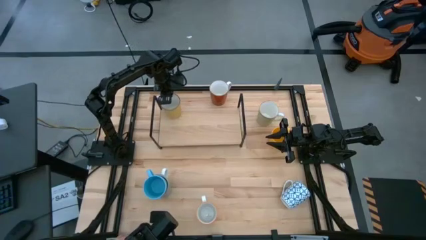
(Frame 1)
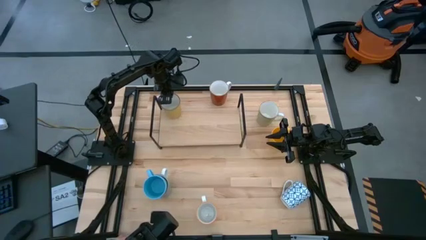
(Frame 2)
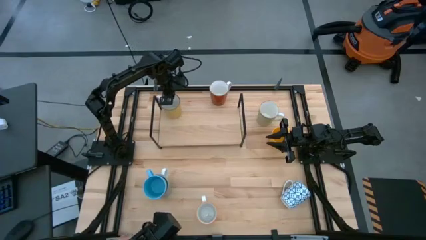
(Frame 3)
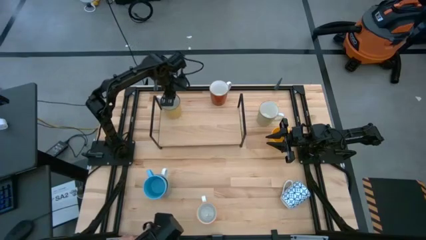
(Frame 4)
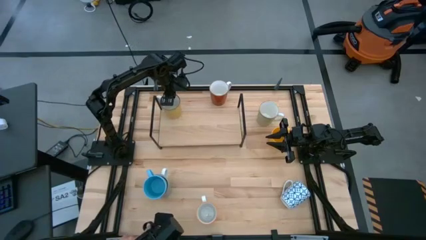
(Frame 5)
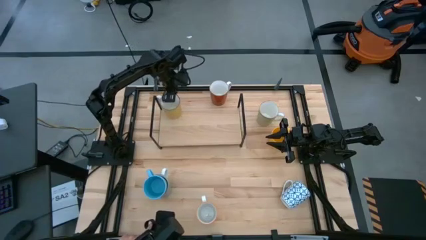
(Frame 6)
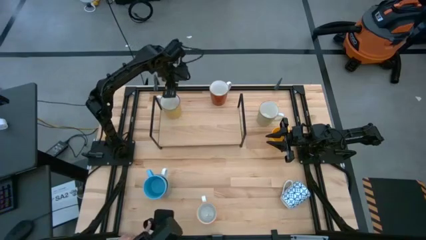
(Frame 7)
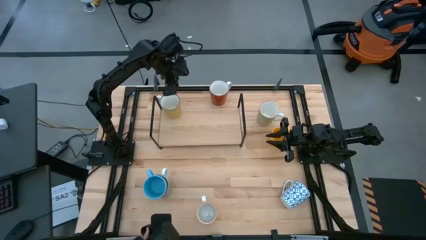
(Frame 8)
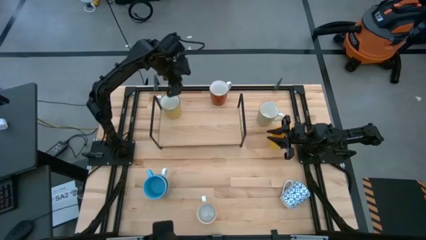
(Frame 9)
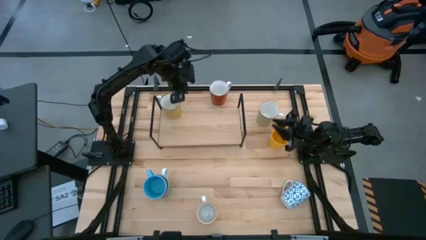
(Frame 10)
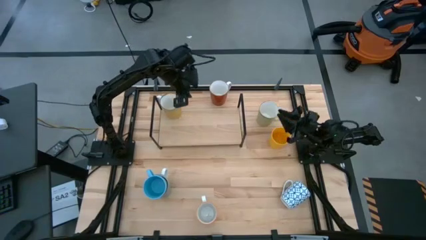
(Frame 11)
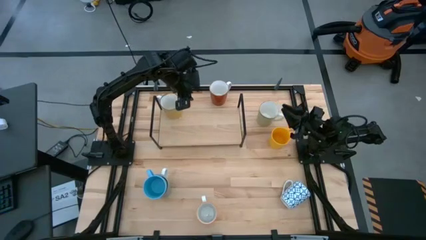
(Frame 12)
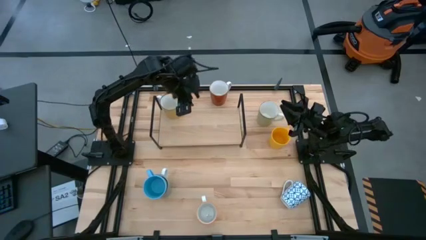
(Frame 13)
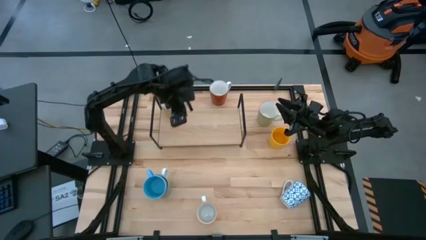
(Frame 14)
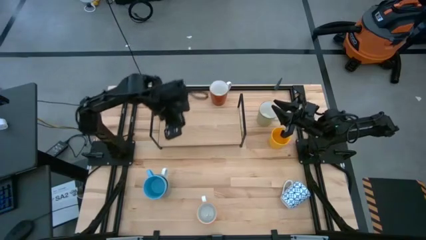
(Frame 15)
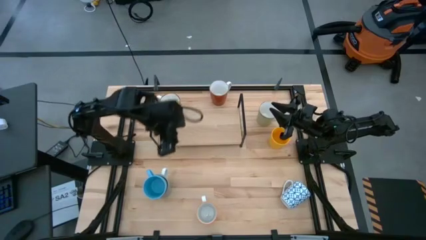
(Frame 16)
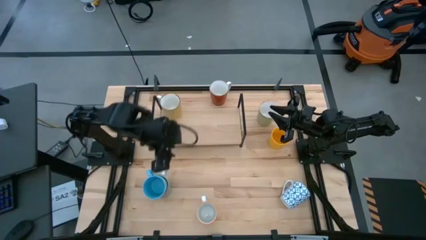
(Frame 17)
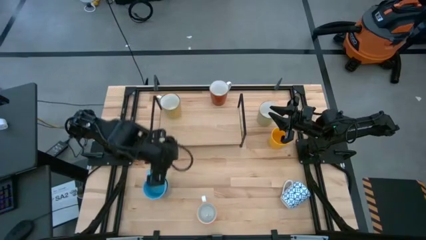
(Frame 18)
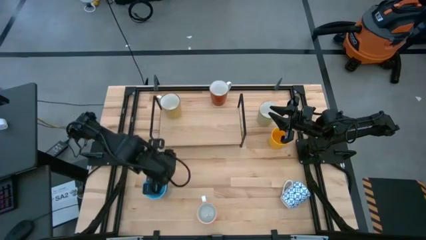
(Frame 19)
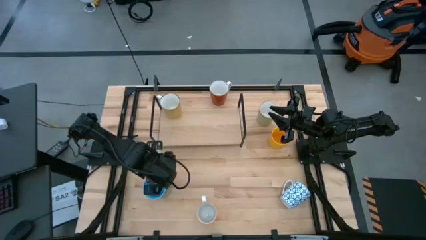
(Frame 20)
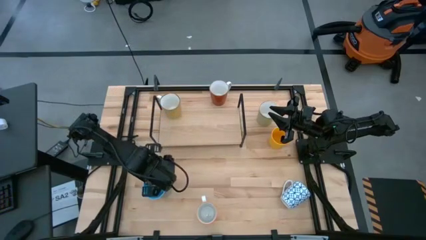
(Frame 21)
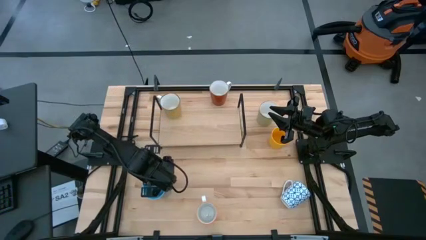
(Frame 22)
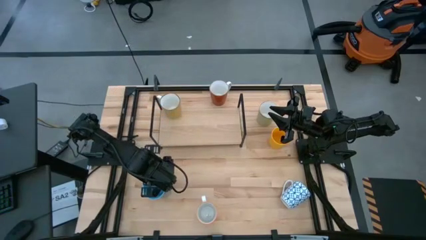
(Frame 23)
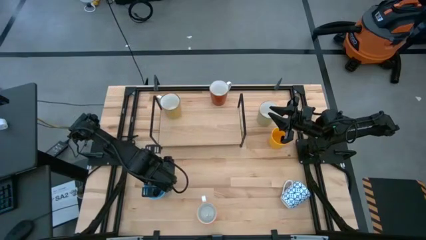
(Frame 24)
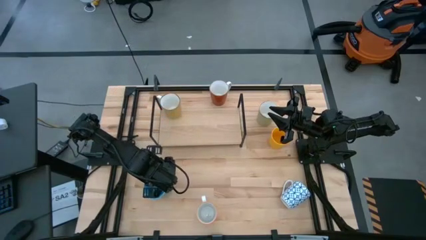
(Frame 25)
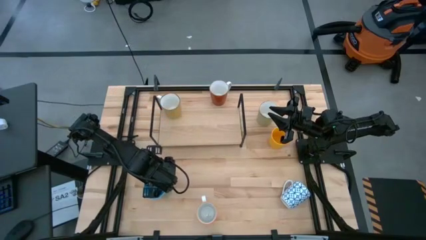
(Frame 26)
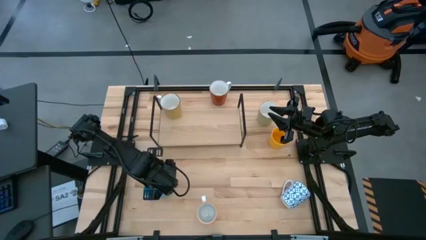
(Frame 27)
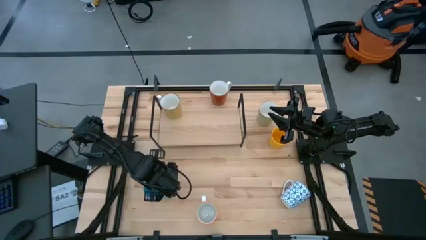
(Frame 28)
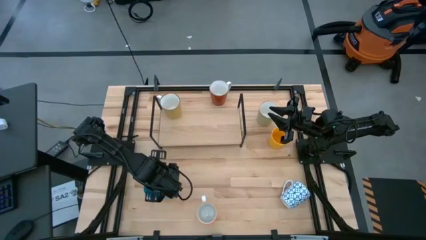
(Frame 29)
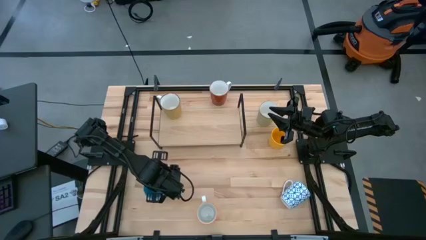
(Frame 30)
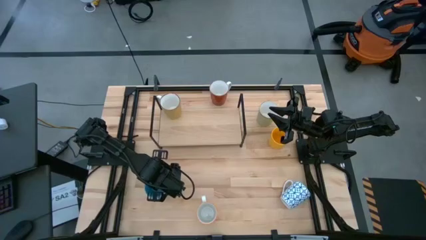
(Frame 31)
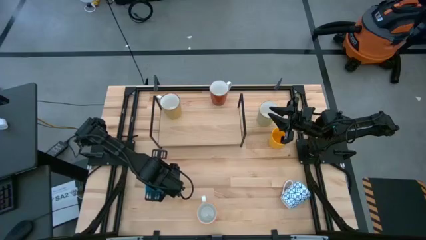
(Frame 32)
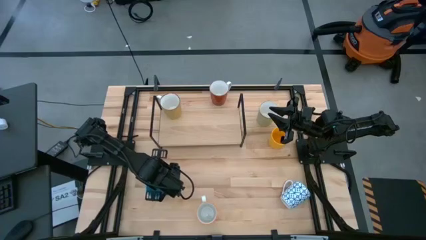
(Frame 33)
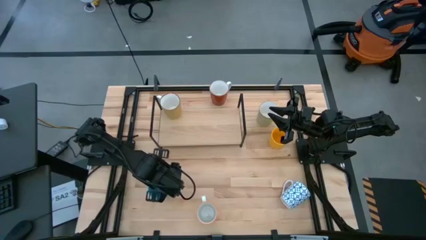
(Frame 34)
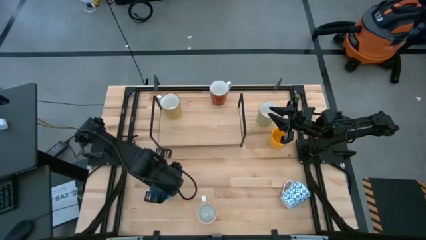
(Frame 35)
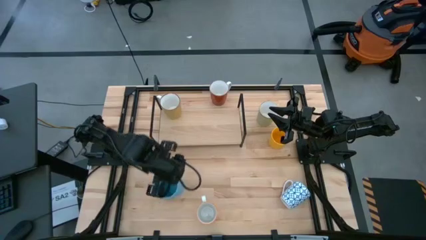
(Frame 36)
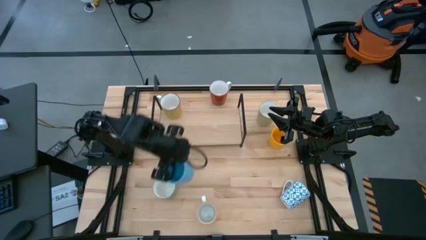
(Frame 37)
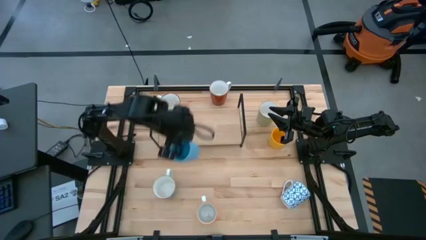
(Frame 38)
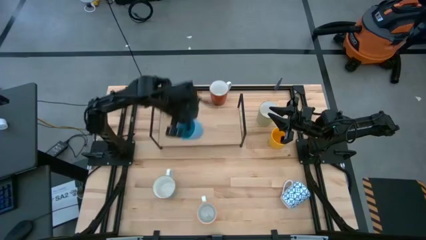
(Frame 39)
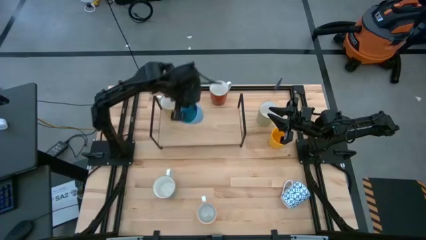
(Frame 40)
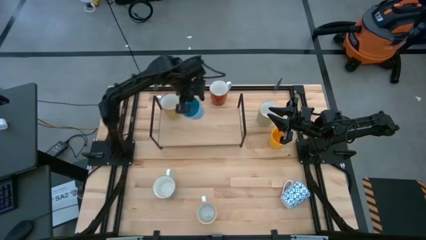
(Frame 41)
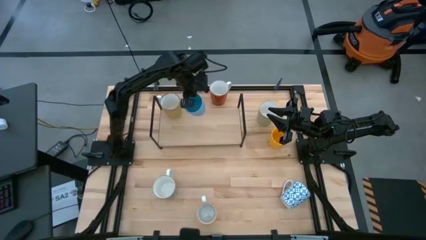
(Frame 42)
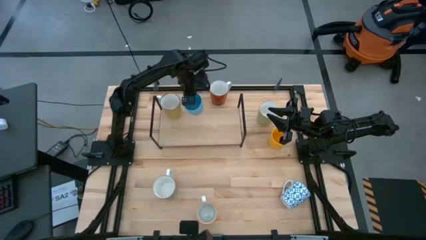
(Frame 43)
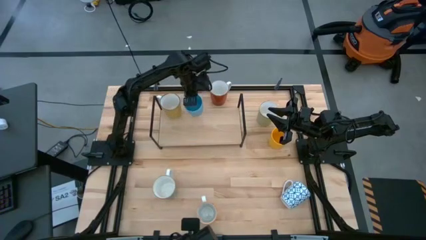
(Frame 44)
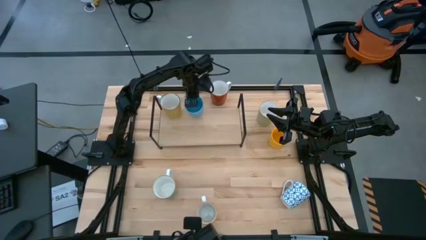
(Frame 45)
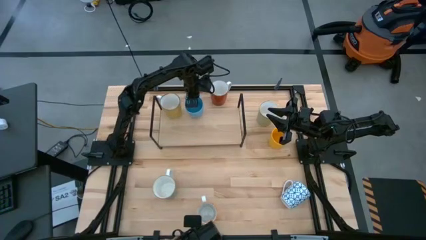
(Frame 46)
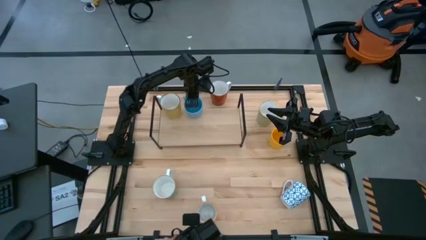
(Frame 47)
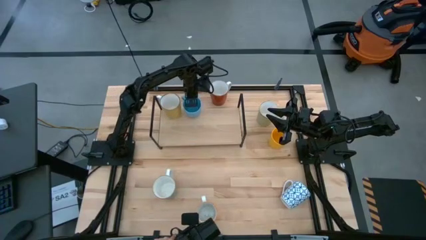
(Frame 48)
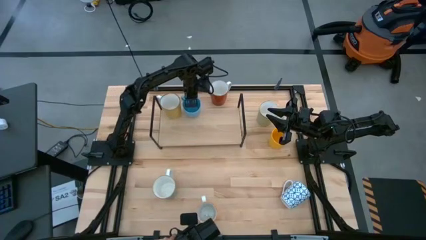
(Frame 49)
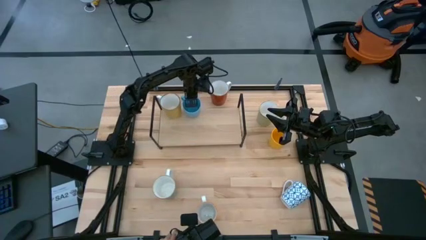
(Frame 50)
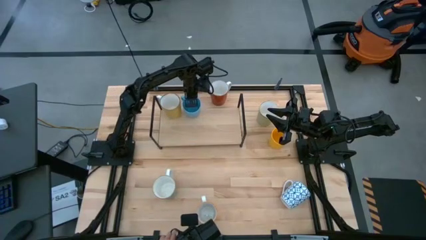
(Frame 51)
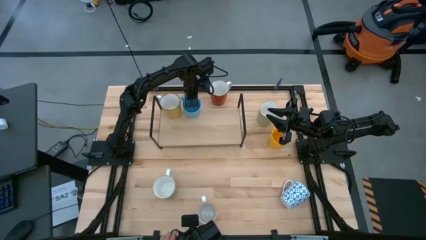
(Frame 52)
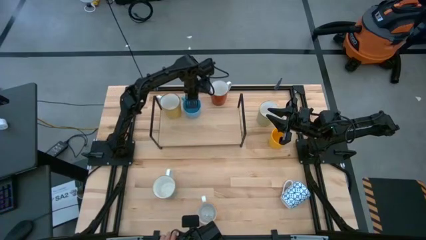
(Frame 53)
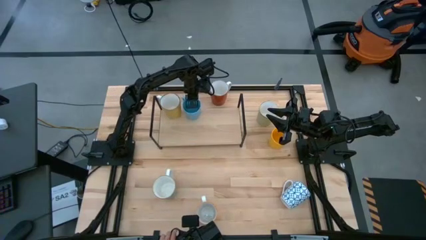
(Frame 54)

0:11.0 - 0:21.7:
Task: Place coffee mugs
Put the blue mug on the shelf
